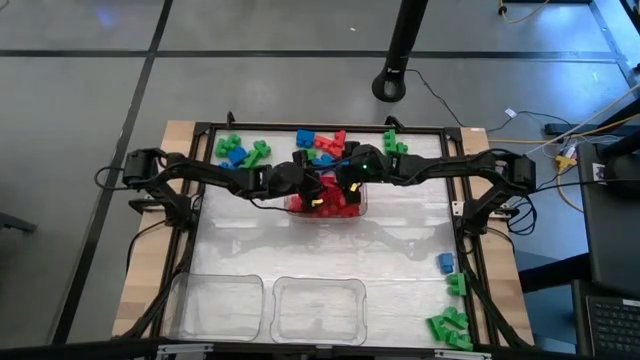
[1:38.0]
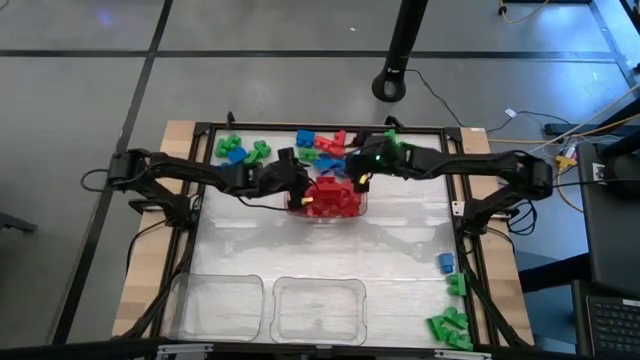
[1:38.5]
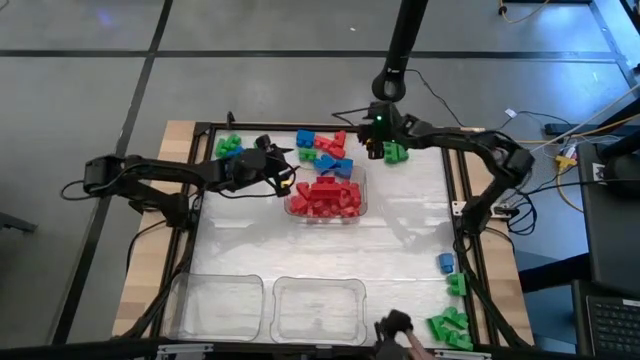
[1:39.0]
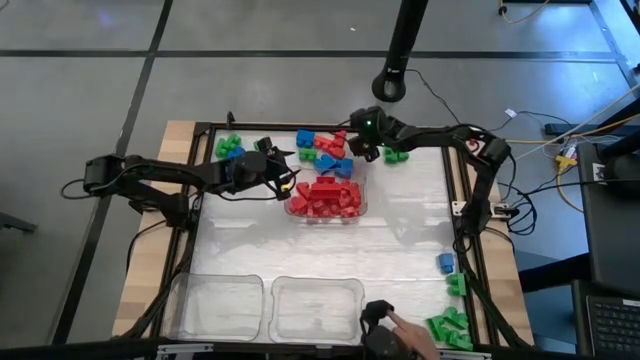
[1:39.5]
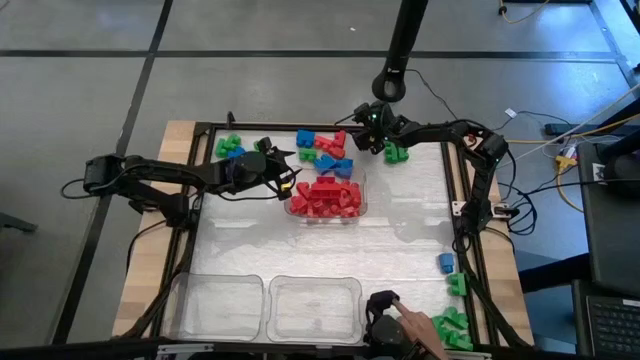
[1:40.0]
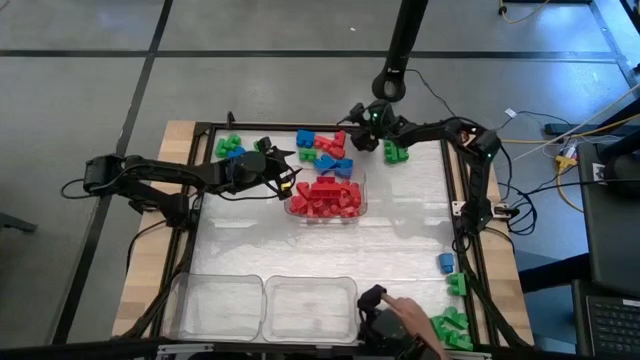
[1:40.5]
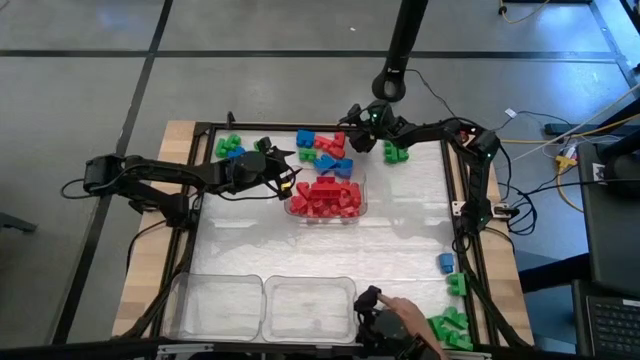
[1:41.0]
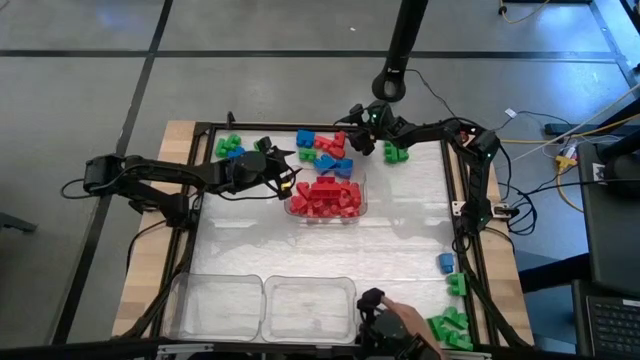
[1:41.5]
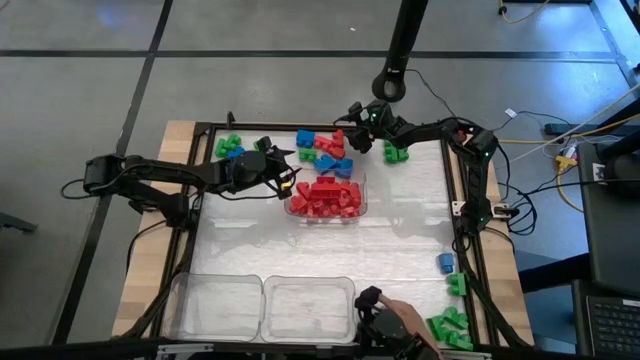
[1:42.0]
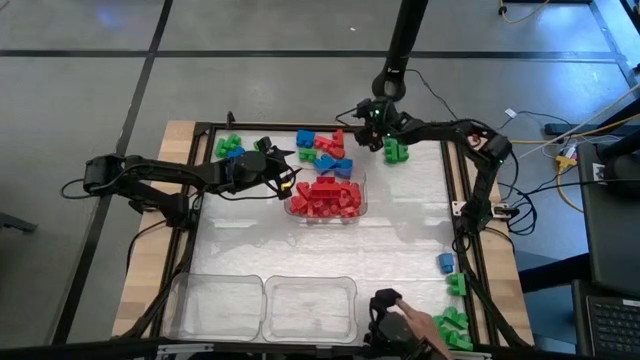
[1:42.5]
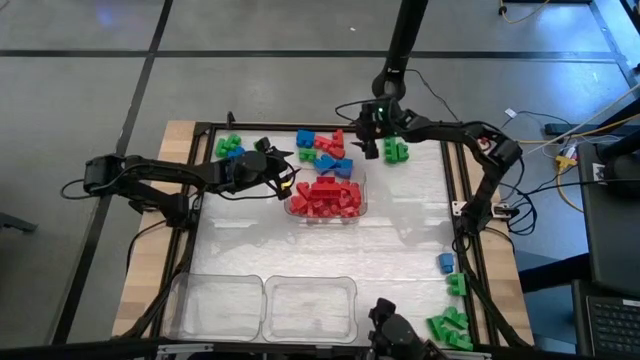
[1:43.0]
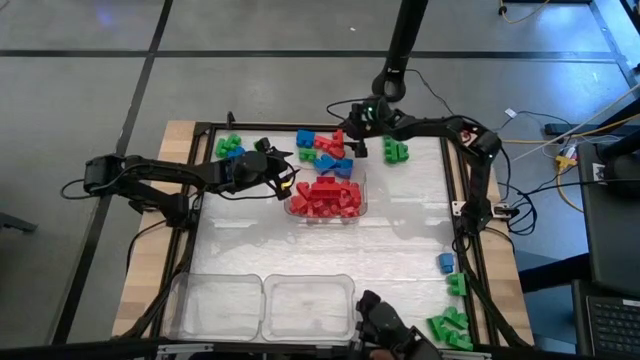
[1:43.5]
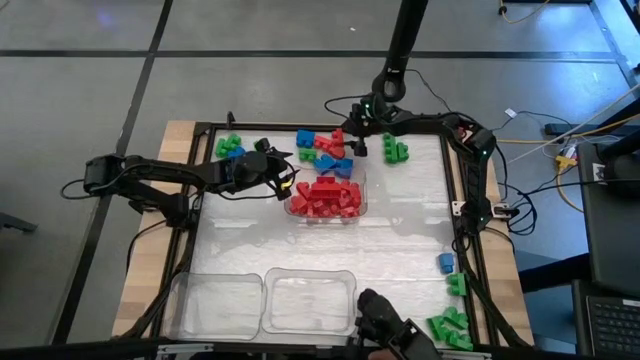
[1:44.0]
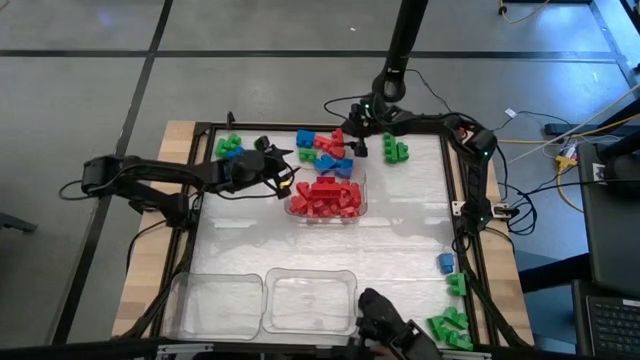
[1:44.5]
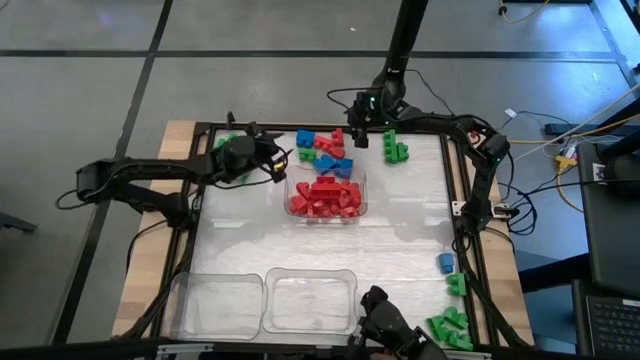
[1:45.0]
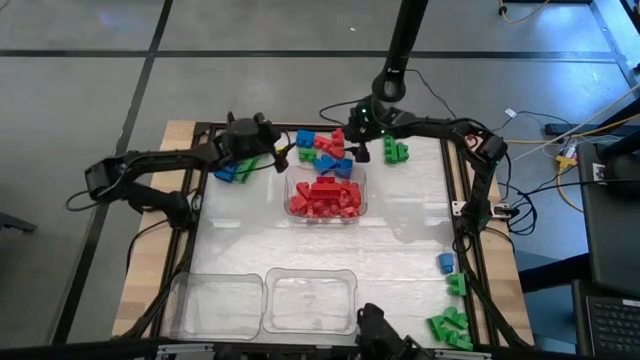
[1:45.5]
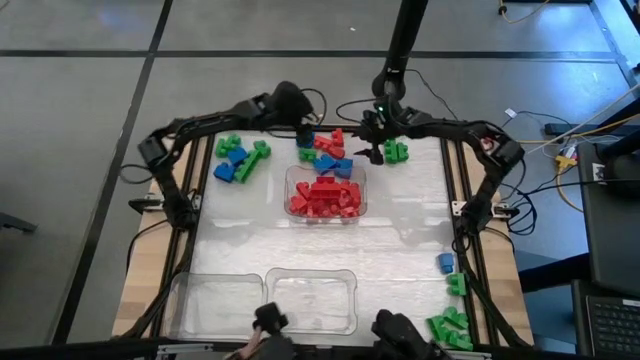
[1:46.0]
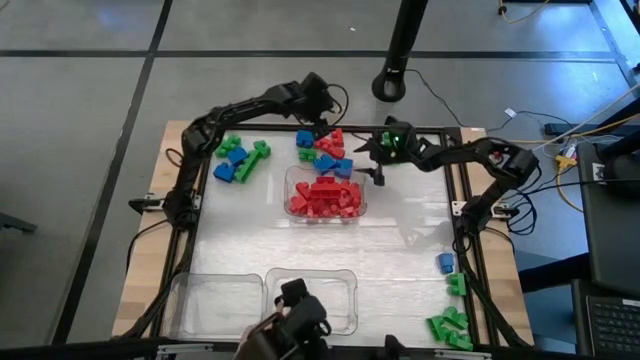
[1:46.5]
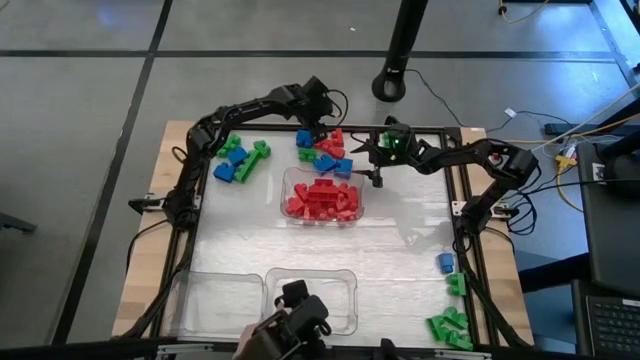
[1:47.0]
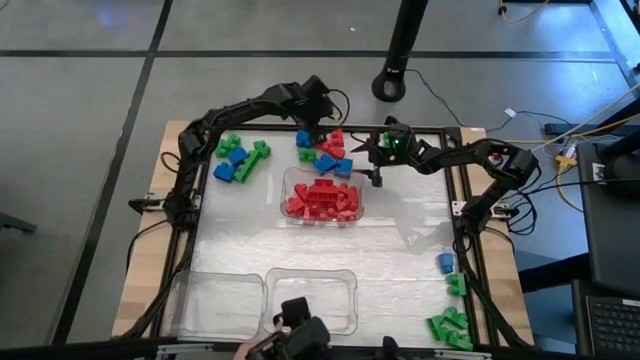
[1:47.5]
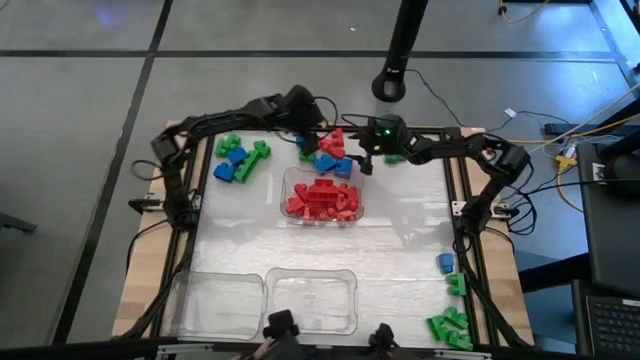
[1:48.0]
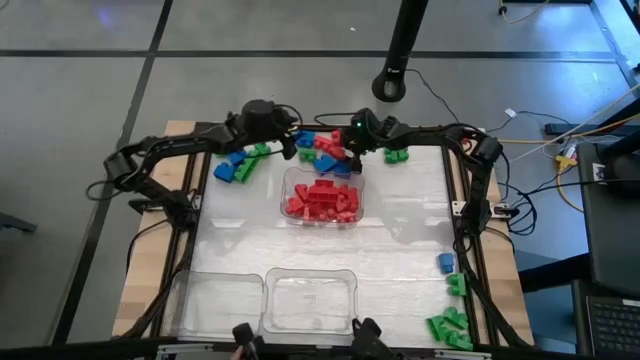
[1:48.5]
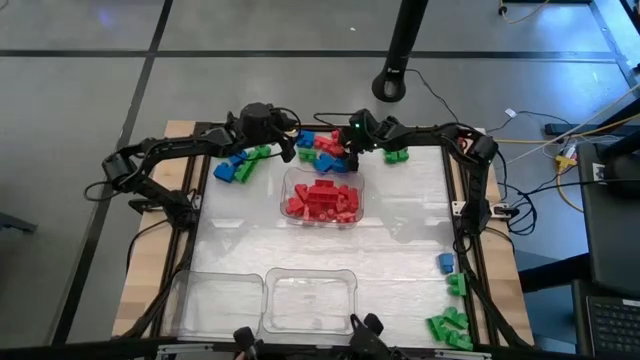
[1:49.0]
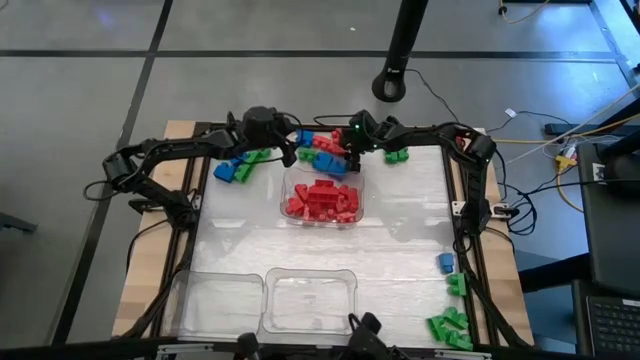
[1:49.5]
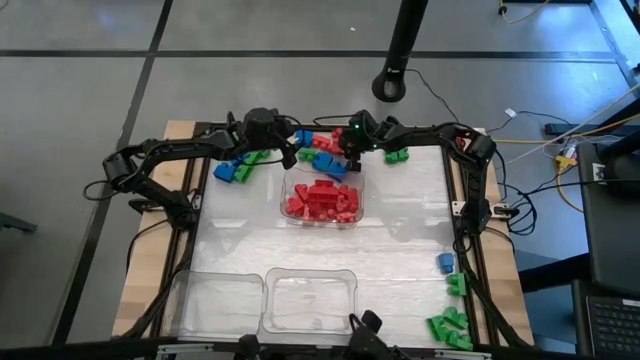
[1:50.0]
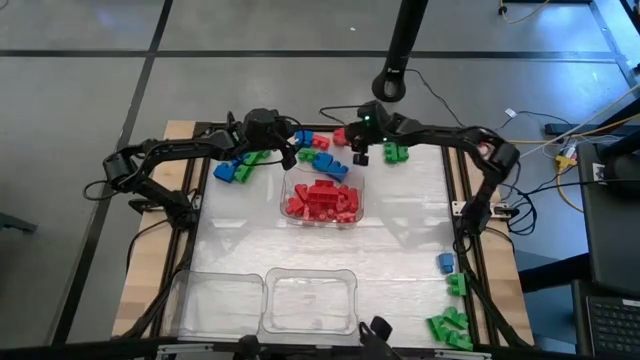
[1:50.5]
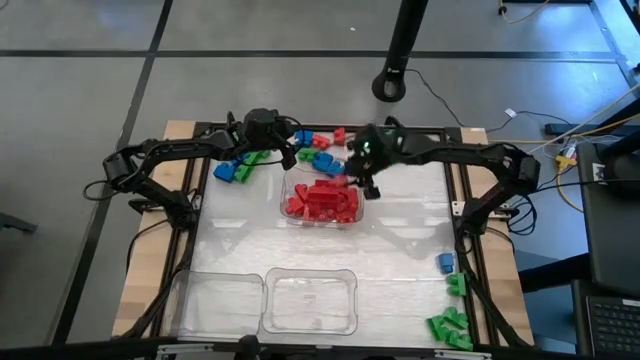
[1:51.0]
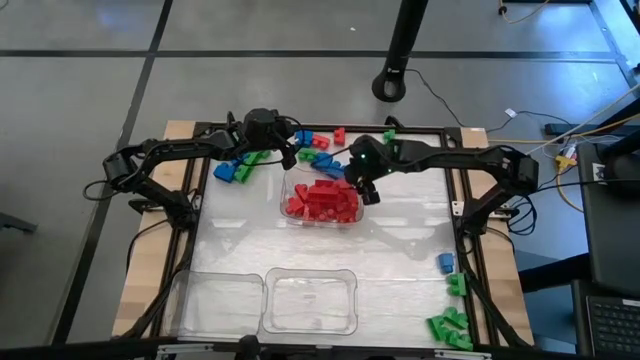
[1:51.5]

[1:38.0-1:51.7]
Task: Sort blocks
Put the red game piece into the top right transparent bin

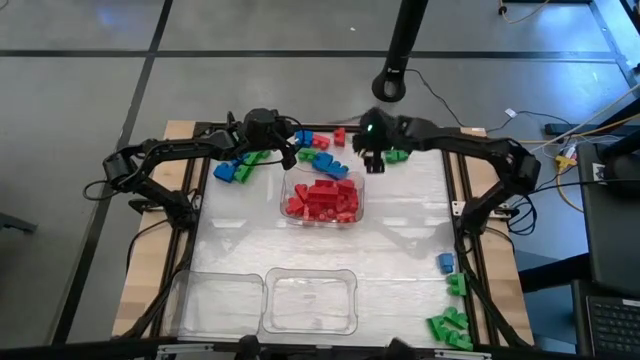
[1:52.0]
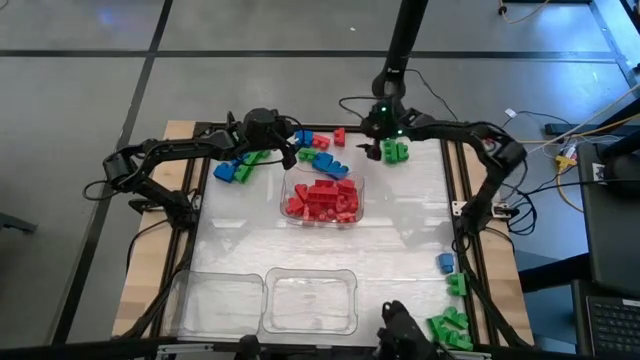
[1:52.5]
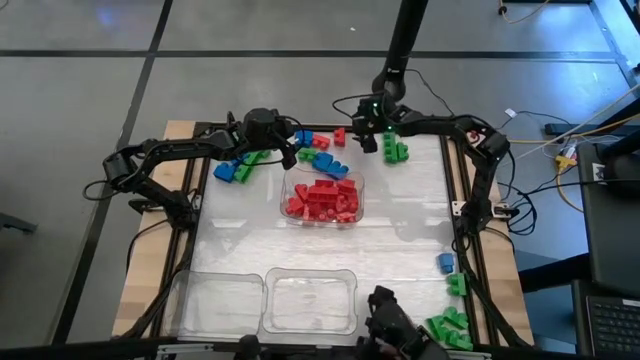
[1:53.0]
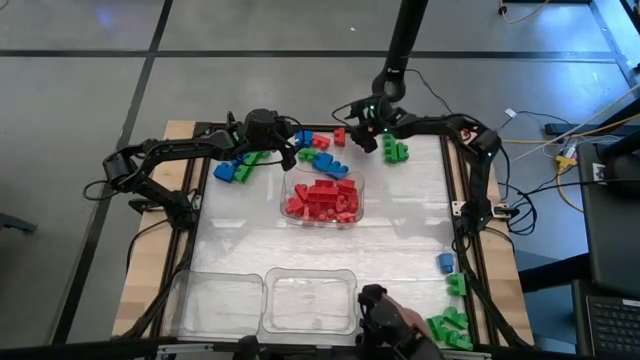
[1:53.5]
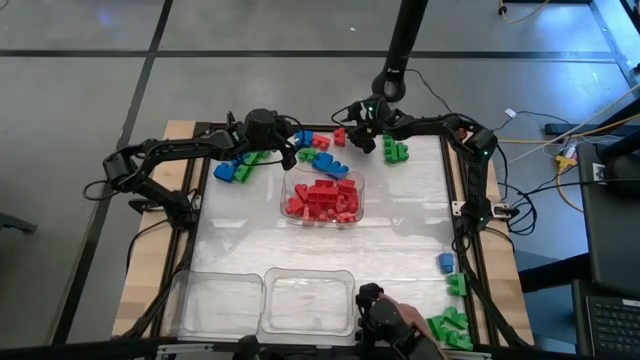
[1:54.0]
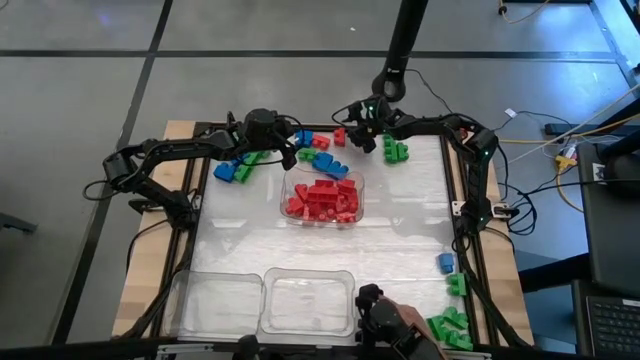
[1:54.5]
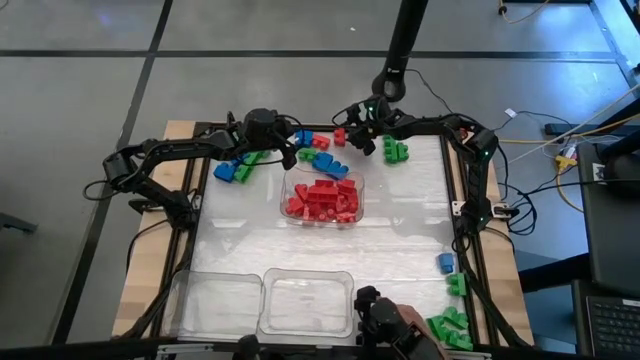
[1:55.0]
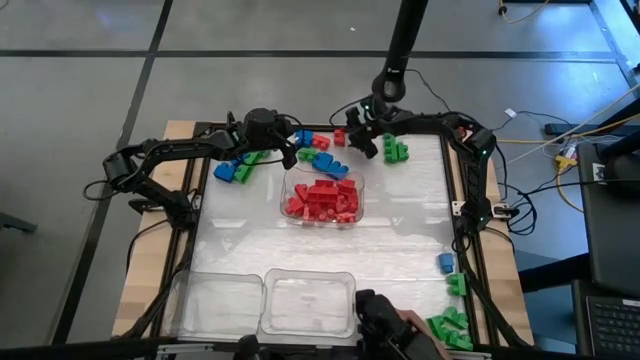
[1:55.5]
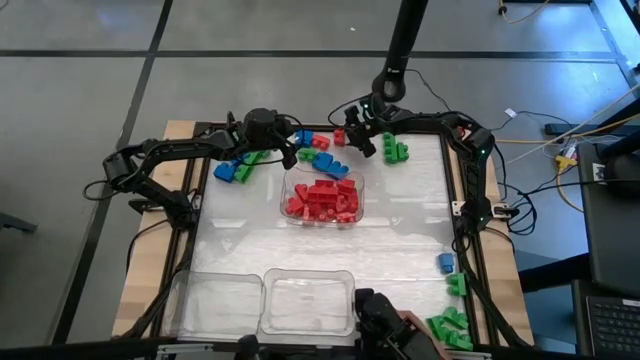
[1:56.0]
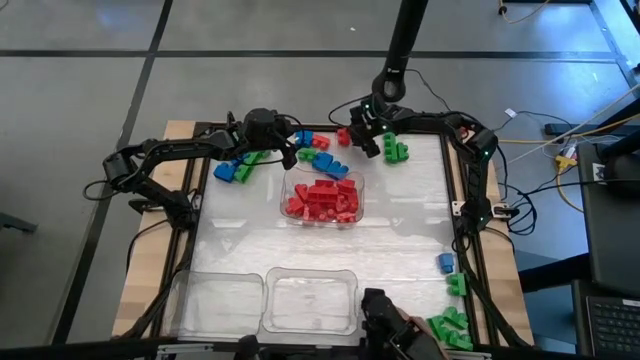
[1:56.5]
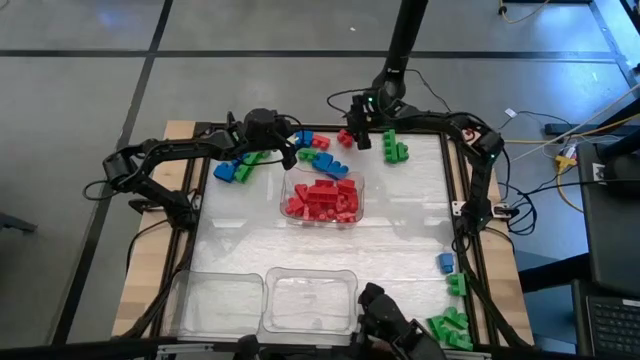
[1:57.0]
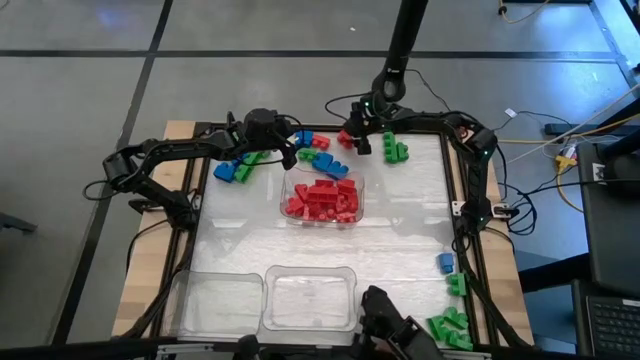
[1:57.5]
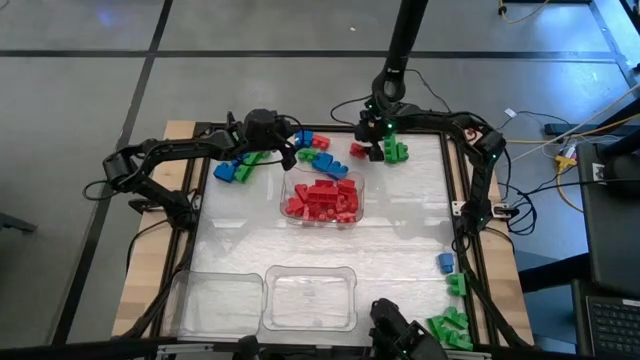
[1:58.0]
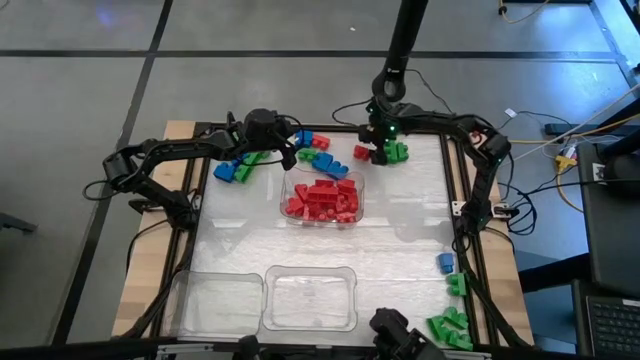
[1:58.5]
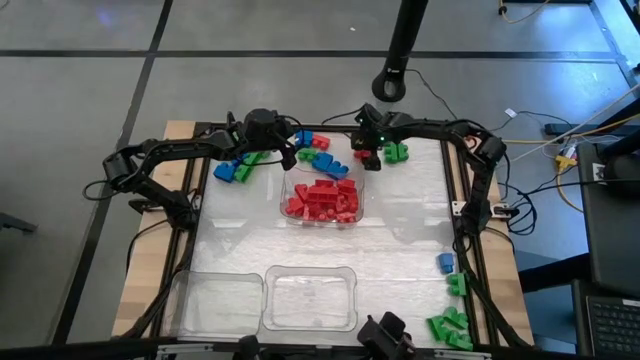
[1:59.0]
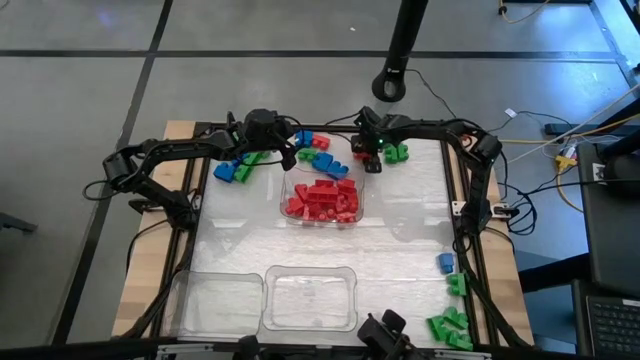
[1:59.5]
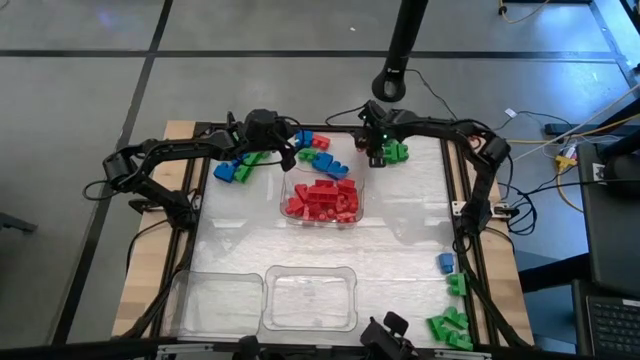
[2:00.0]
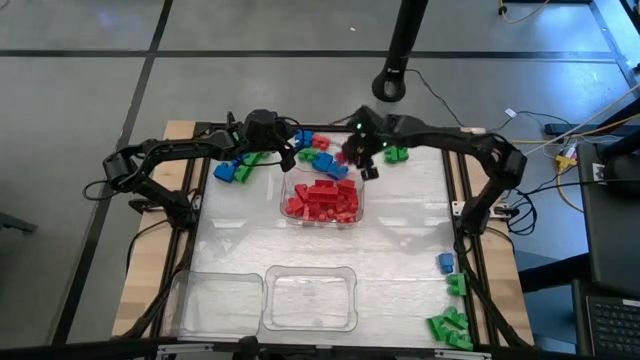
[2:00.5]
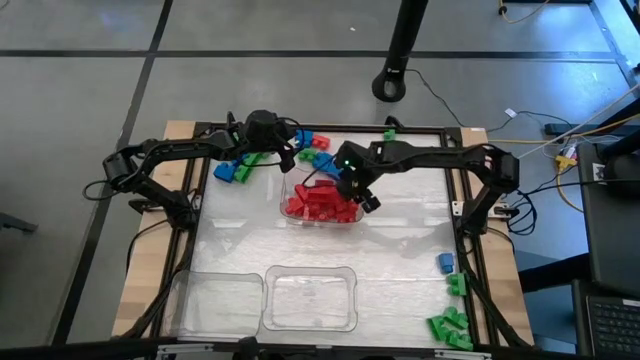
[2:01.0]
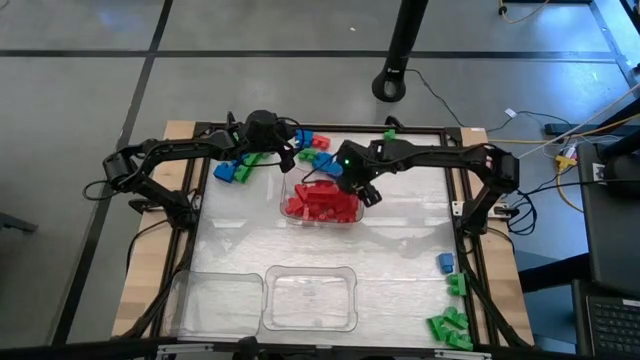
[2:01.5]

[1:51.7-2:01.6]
Put the red game piece into the top right transparent bin
